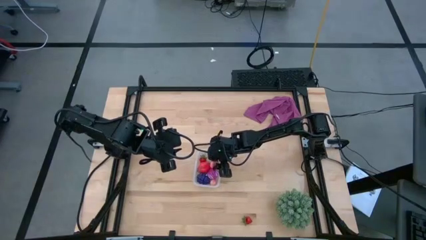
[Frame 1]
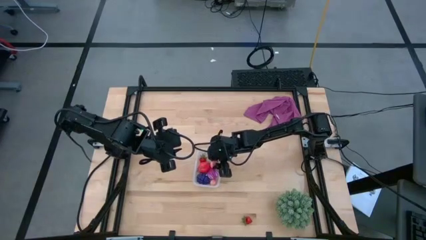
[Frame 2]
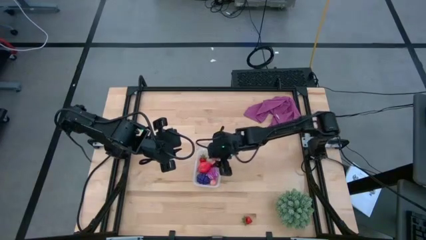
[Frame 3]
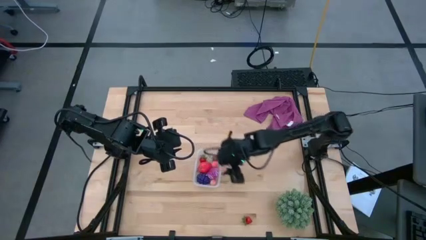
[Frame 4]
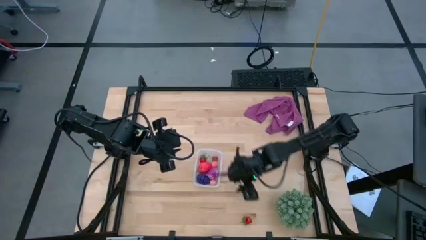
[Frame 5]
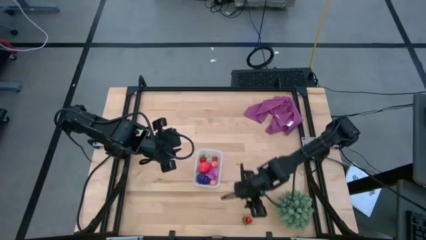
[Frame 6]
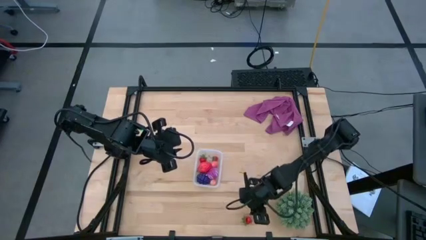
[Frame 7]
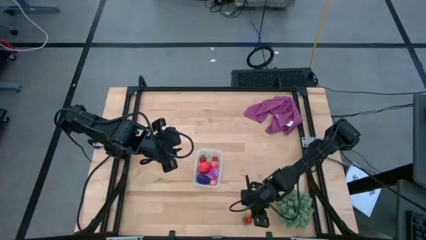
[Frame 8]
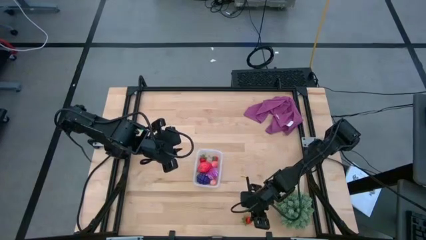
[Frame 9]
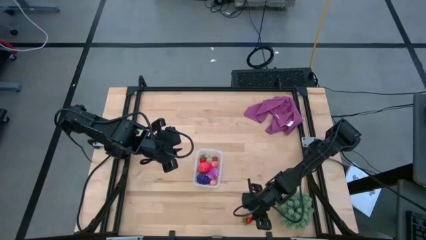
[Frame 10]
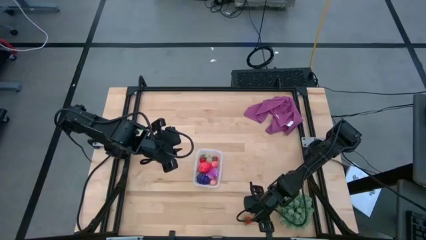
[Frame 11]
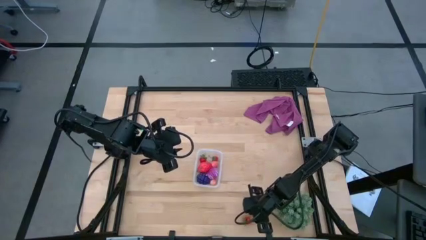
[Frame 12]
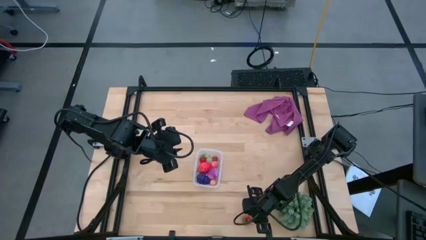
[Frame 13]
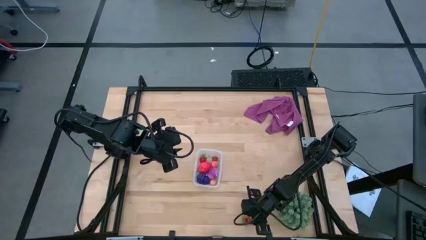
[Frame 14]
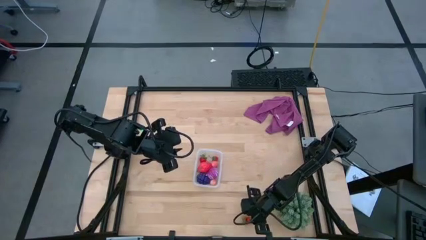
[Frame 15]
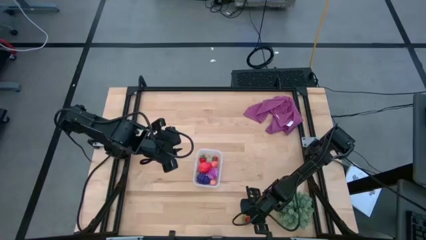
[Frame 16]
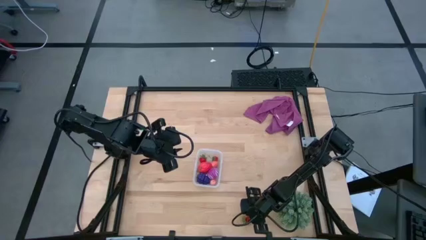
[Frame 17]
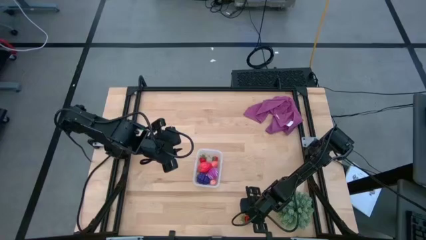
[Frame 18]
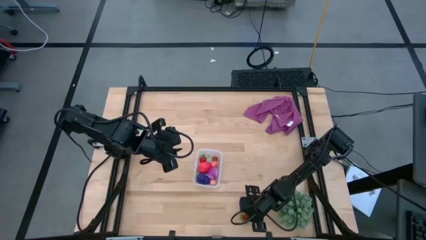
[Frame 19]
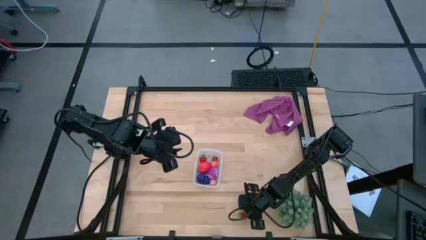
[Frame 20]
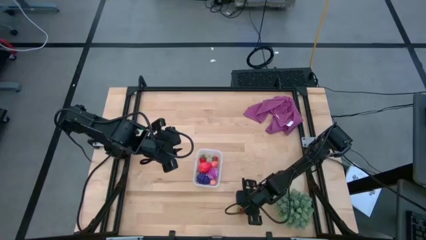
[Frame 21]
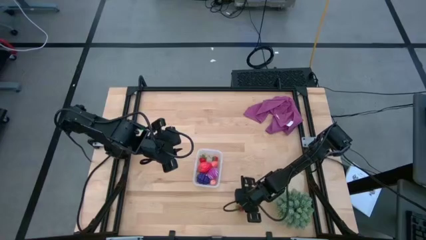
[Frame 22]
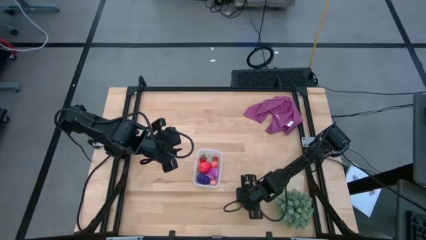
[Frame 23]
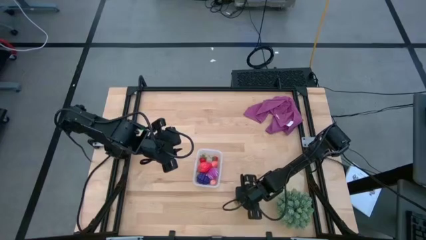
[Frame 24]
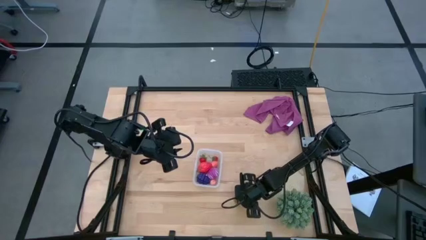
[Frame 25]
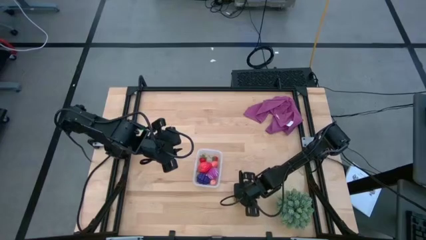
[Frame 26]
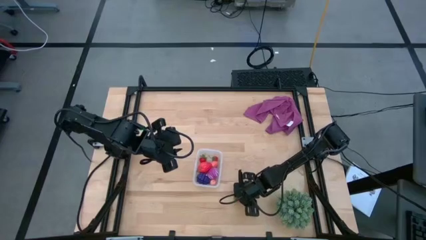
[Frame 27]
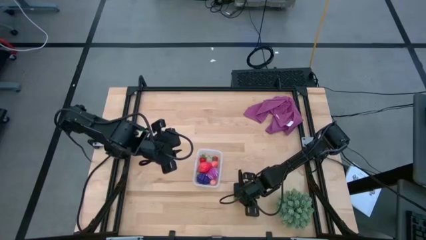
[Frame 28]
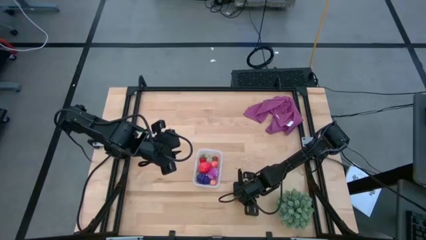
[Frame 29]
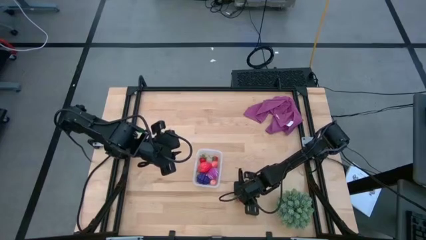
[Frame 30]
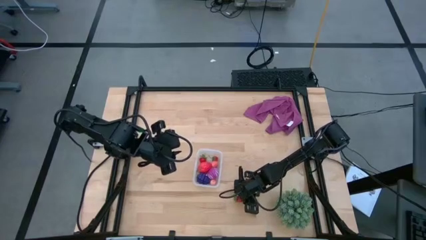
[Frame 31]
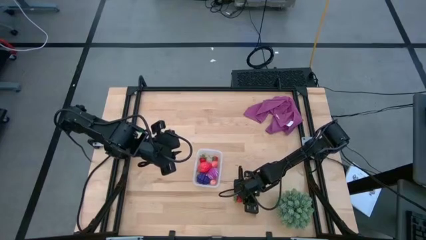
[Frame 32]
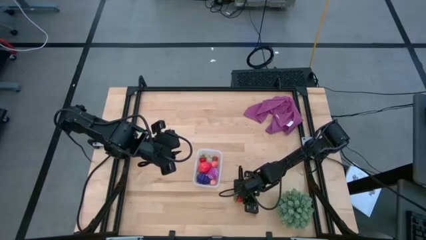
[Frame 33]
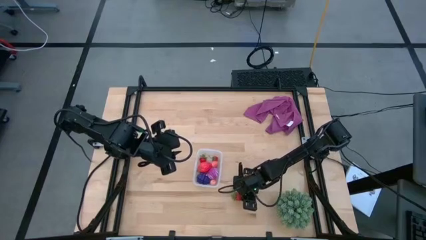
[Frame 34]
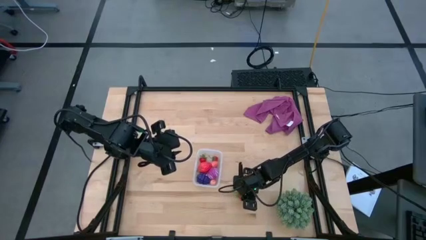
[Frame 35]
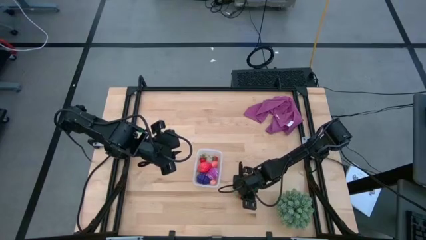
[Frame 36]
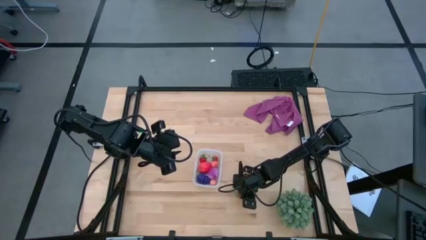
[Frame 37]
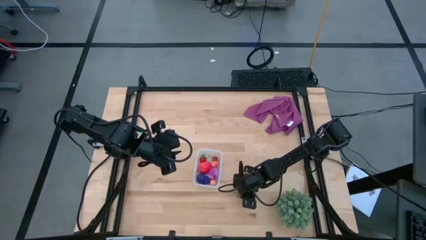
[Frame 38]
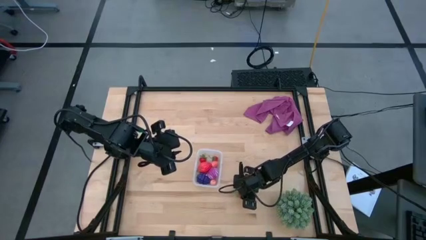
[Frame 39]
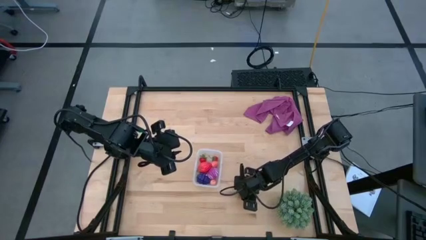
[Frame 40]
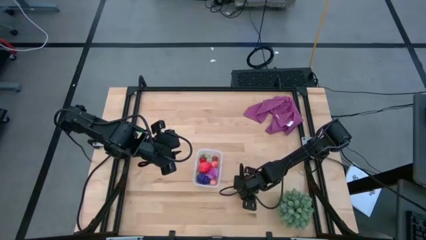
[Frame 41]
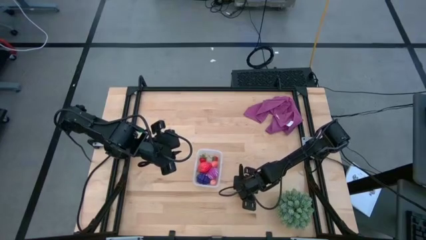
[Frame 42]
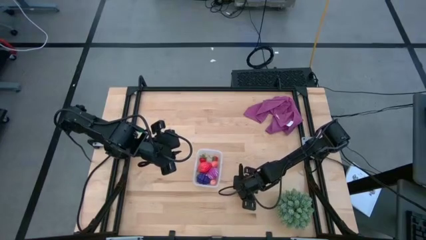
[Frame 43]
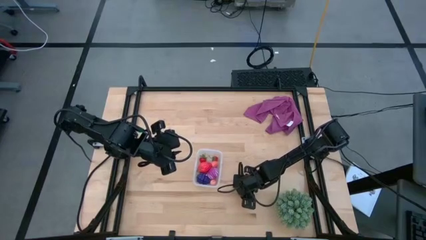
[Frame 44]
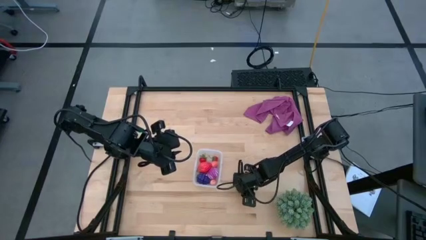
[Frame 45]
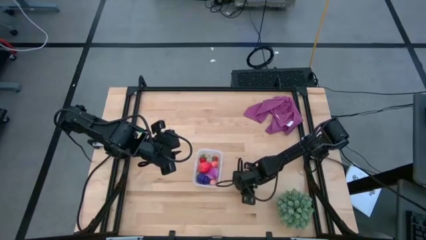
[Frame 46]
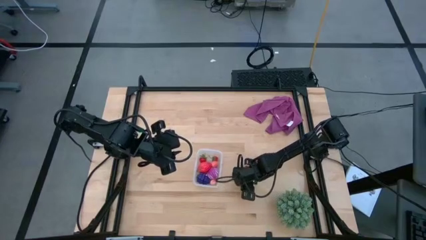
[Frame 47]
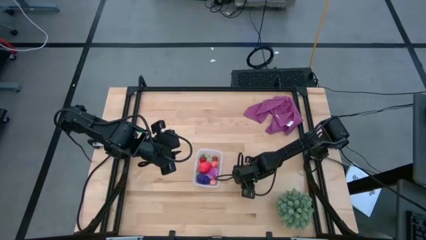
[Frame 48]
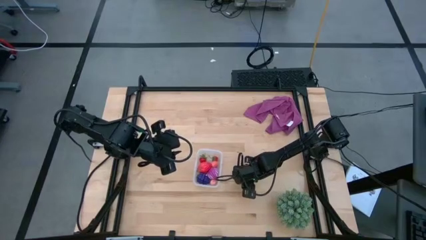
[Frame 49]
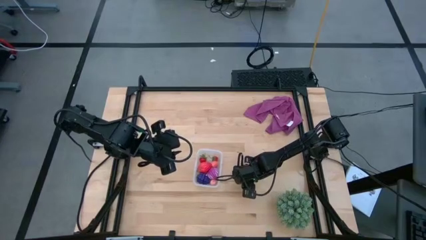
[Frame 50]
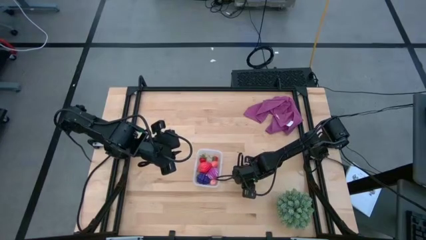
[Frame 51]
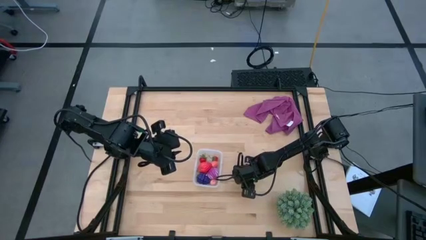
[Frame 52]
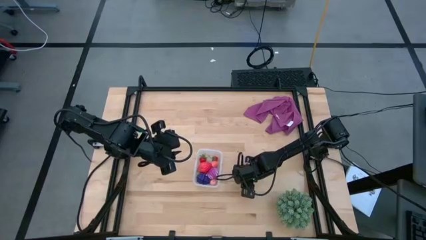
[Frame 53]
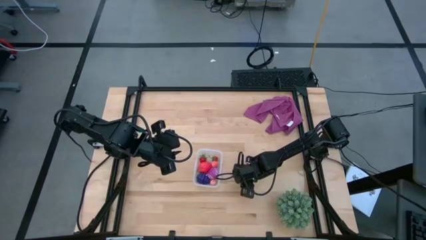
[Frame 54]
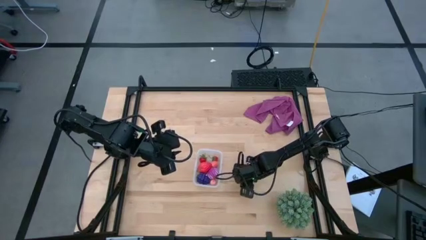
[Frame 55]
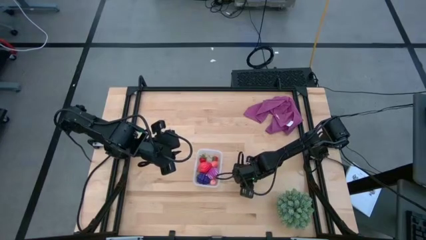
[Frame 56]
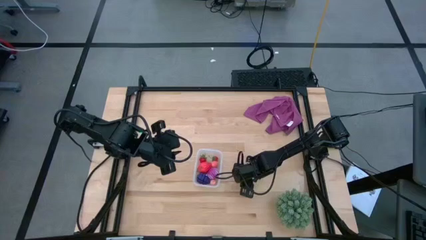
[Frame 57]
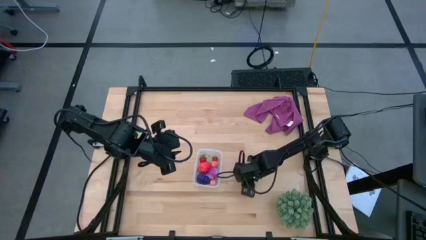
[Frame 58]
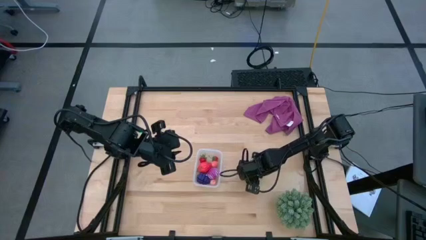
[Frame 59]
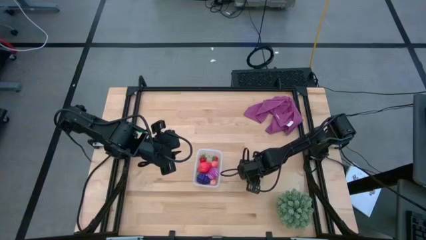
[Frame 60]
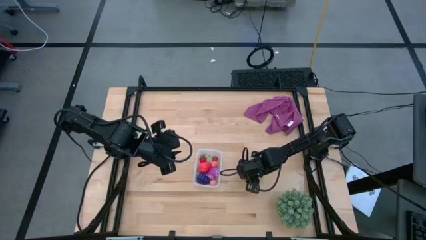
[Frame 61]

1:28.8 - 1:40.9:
Task: Pick and placing Produce into tupperware
Put the red strawberry into the transparent bin

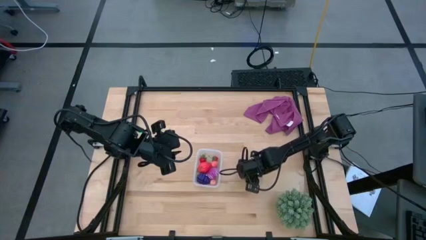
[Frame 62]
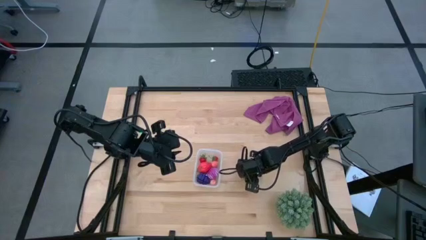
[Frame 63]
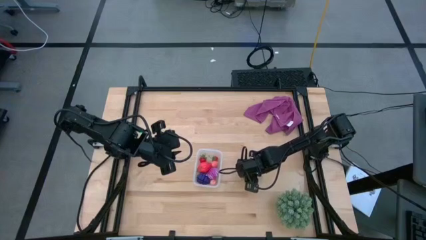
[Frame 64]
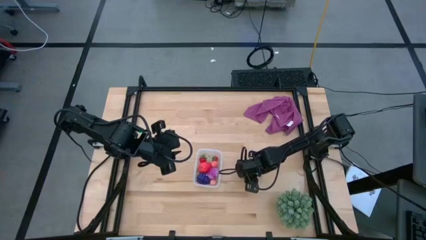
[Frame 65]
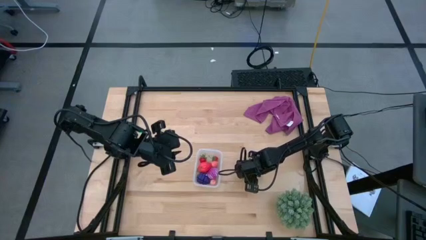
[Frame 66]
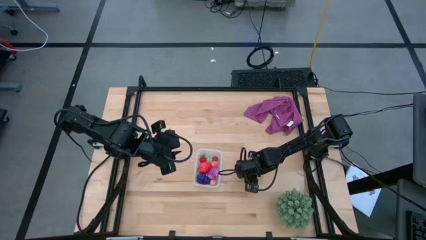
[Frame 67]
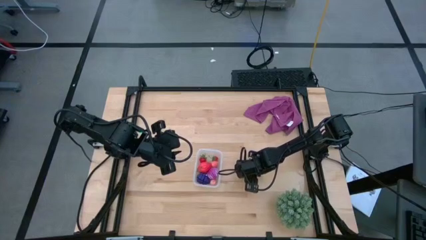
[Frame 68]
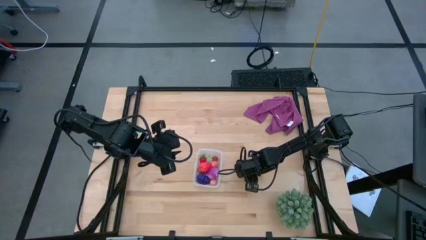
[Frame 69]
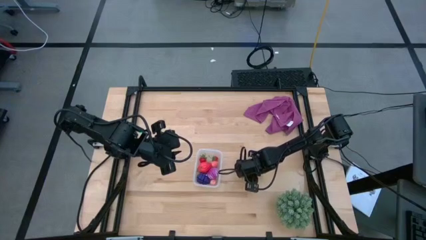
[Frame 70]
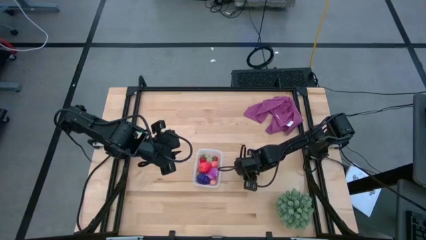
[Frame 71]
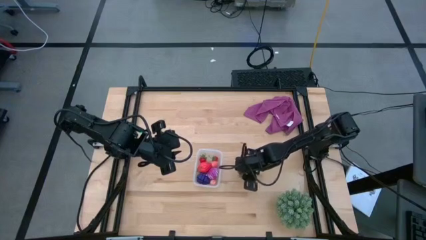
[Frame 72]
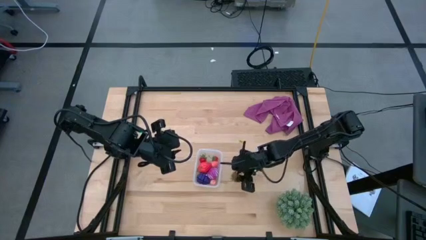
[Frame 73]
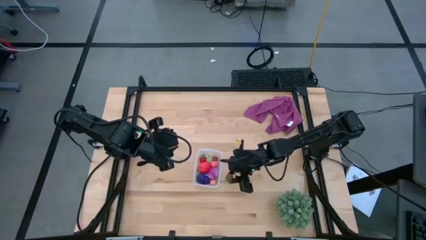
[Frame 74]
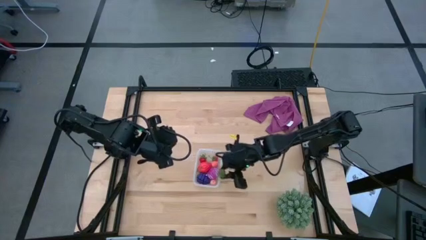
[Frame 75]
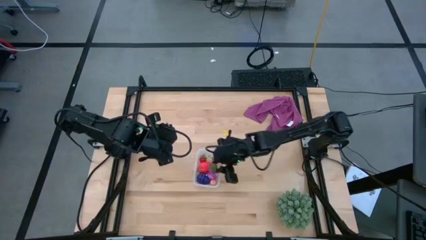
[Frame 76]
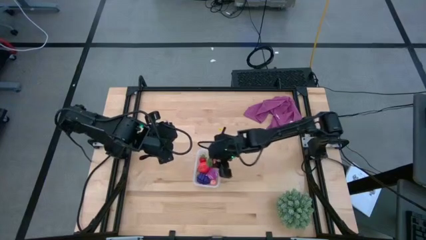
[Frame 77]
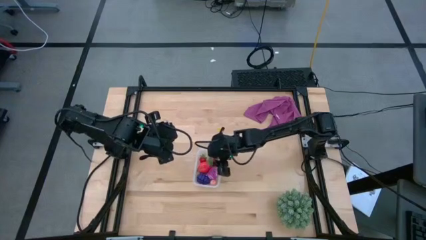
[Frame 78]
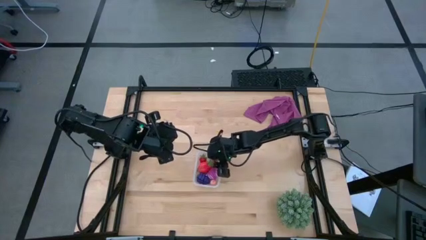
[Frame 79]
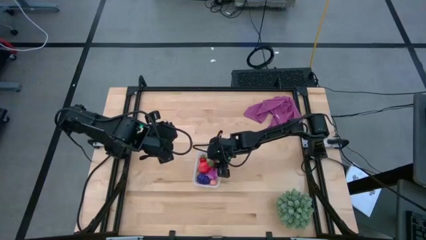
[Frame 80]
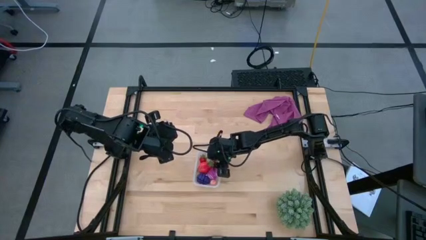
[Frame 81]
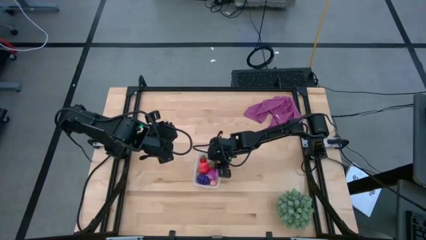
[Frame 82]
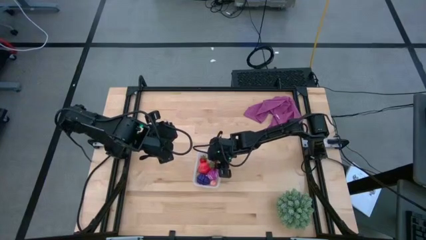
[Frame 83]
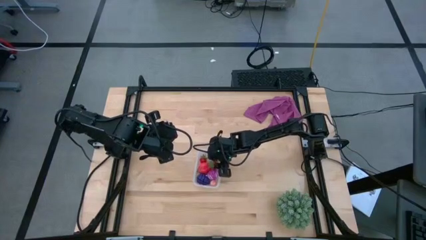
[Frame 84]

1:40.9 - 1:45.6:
Put the red strawberry into the transparent bin
